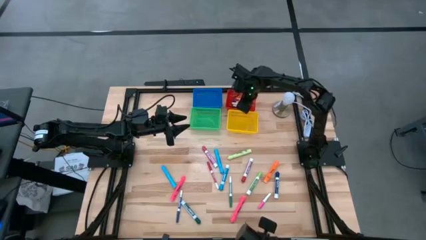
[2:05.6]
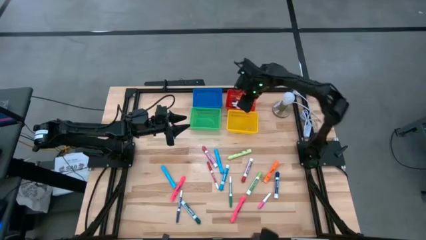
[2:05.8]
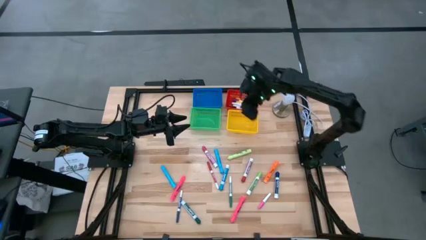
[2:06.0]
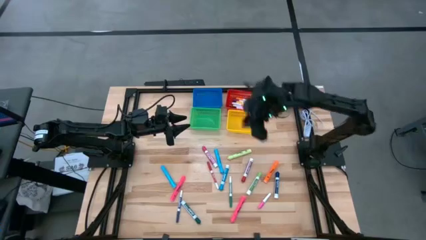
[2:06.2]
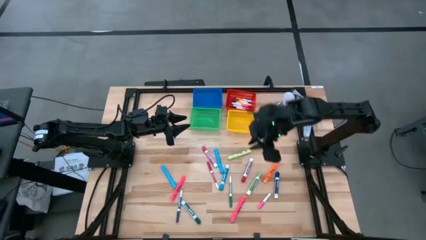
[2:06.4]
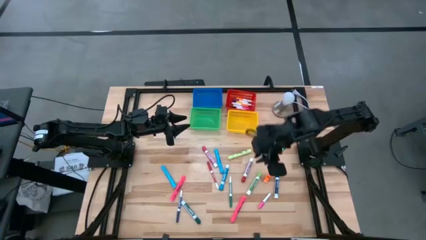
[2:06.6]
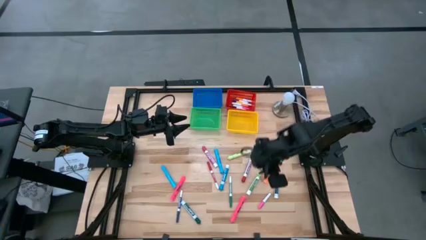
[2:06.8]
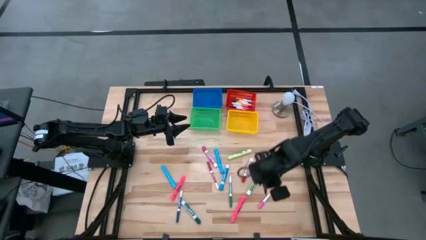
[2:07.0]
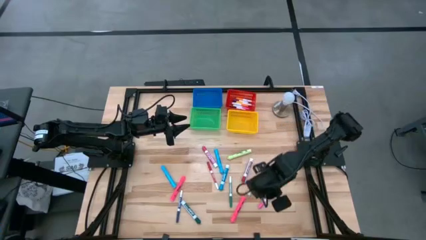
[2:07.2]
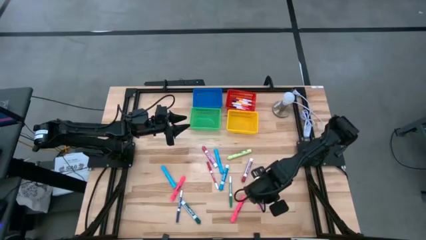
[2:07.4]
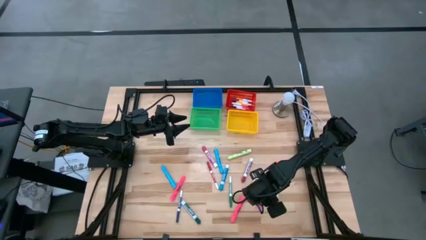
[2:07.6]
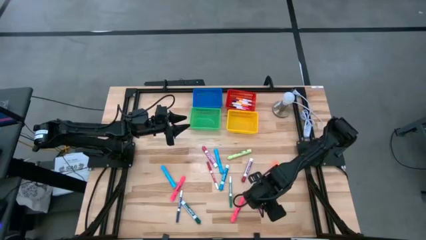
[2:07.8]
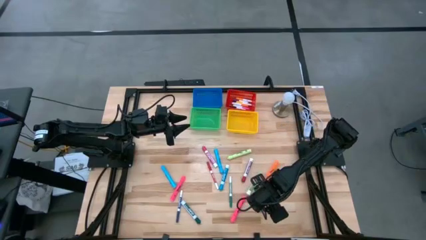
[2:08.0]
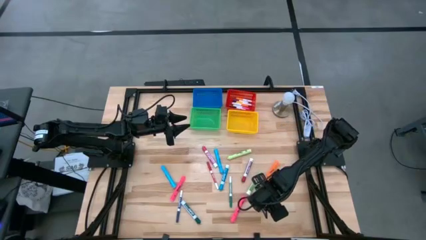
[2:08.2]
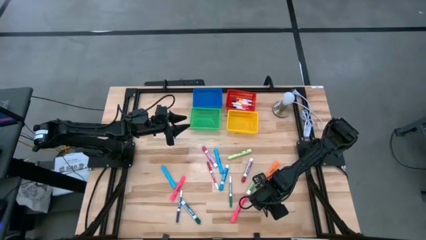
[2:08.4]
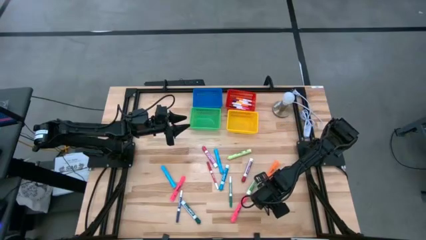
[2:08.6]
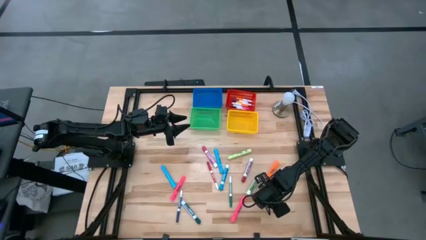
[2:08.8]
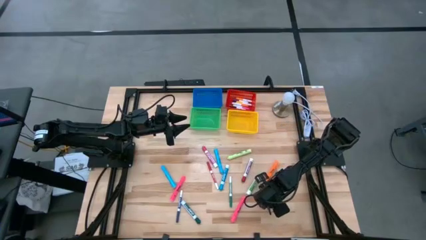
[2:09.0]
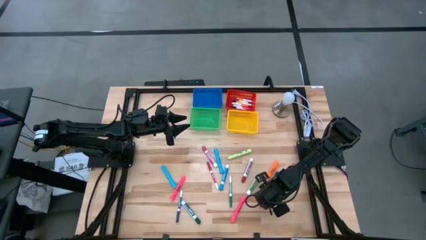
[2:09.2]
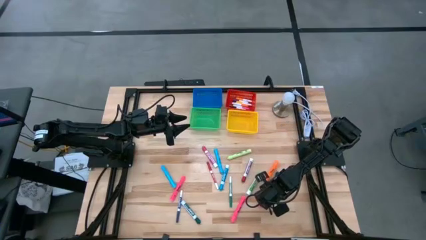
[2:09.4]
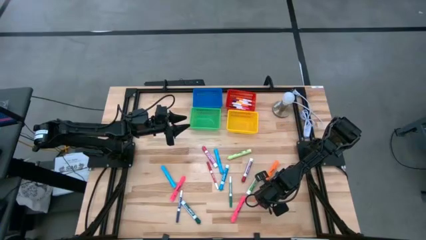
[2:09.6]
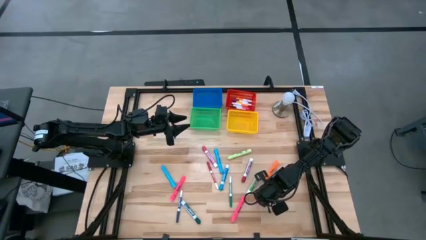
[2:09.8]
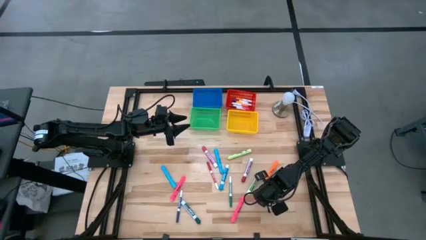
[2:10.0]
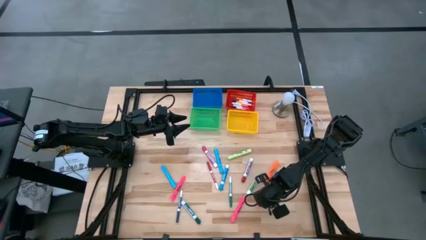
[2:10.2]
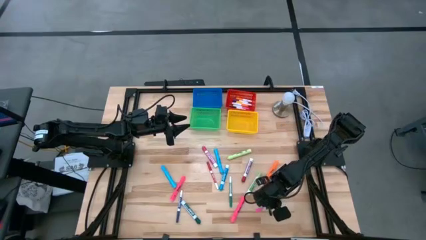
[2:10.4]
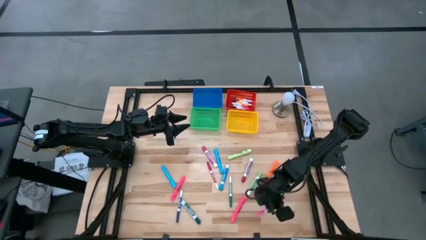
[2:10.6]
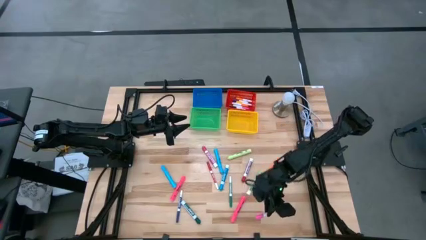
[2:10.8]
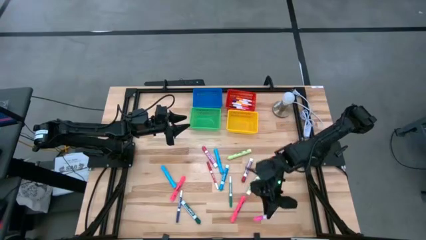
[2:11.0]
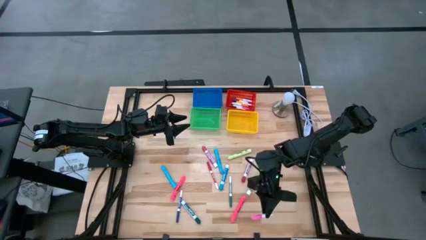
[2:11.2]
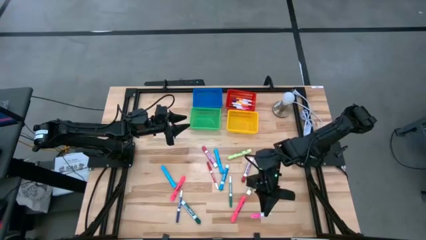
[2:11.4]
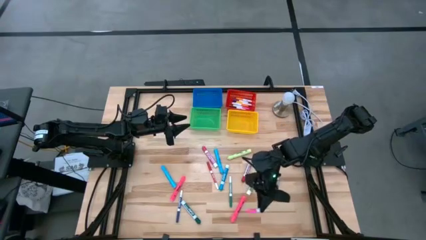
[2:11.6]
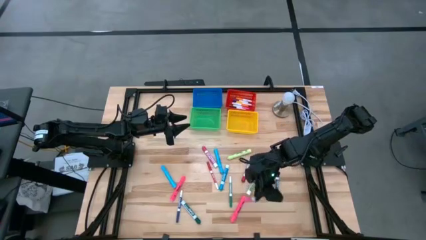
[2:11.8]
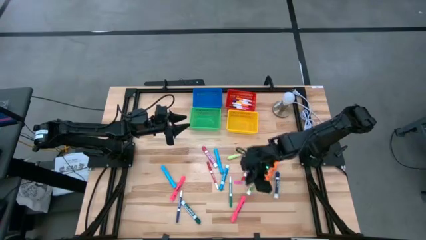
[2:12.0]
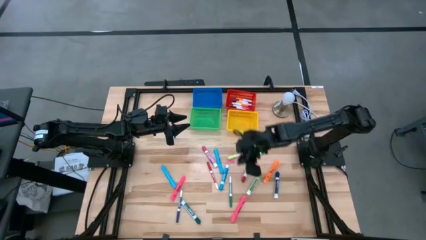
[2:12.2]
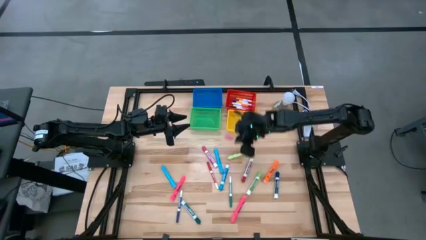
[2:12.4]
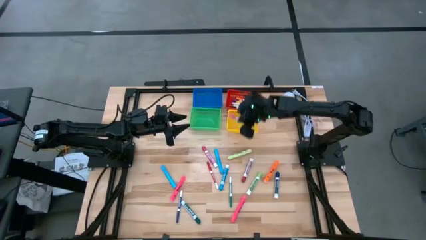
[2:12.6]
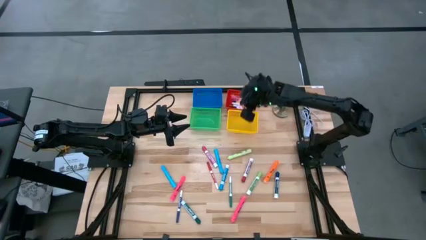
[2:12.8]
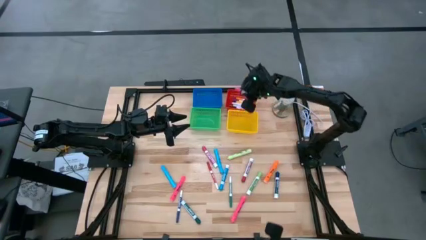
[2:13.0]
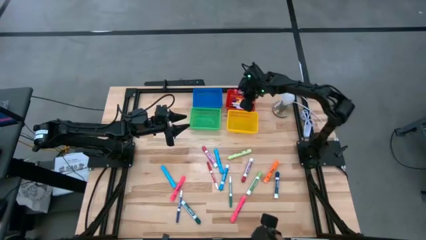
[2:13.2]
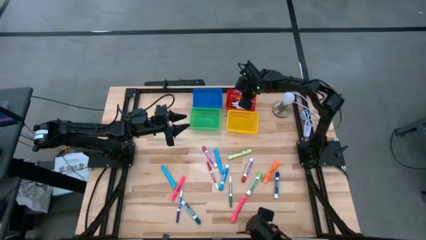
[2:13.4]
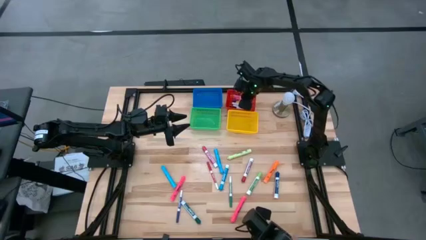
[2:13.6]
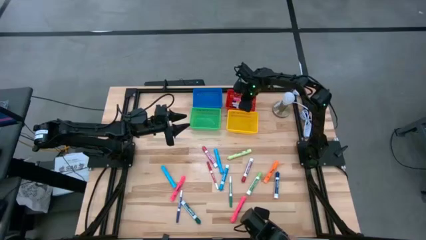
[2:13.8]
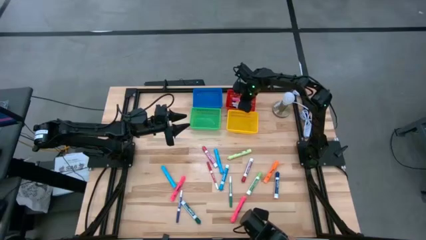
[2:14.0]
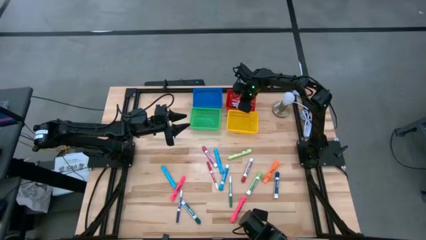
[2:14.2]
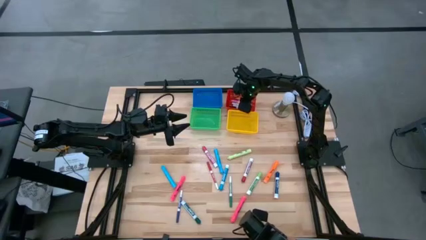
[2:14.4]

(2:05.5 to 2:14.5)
Task: Pick & Place Markers
Put the pink pen into the red basket
